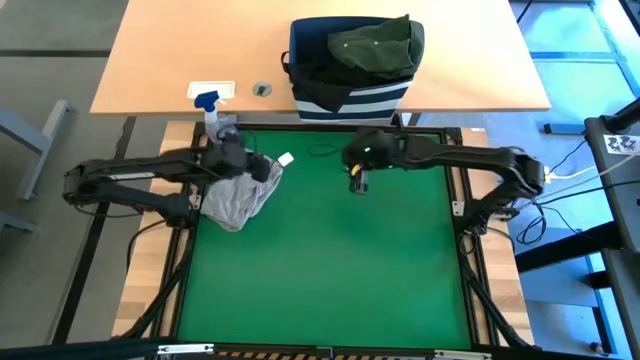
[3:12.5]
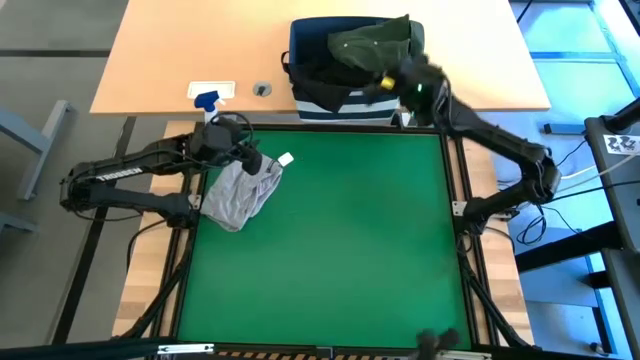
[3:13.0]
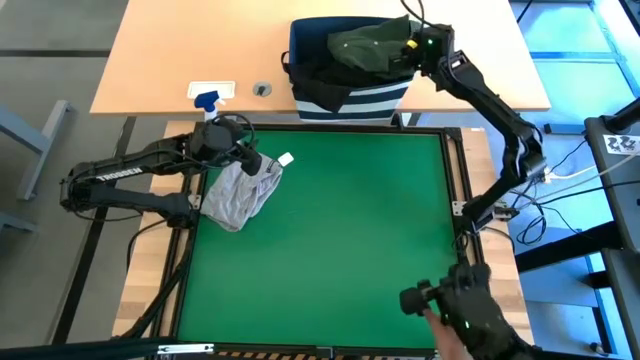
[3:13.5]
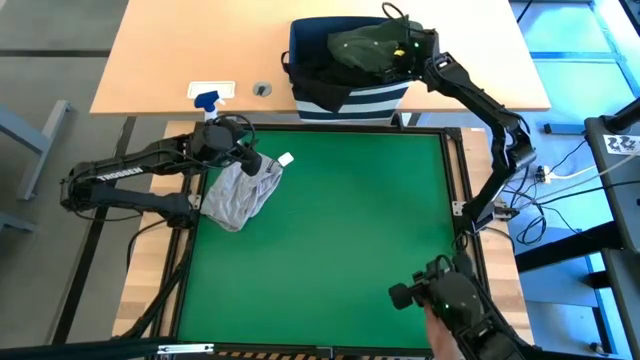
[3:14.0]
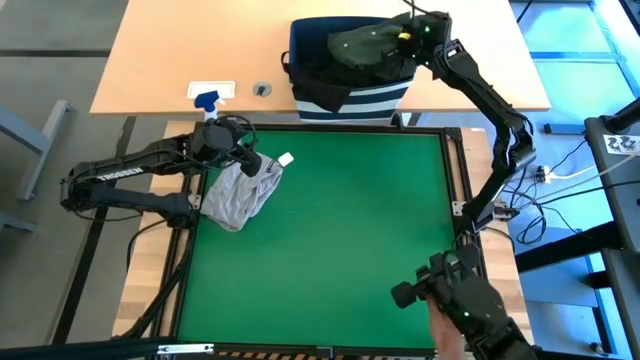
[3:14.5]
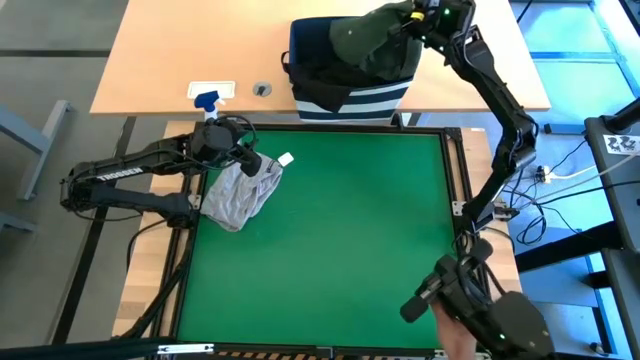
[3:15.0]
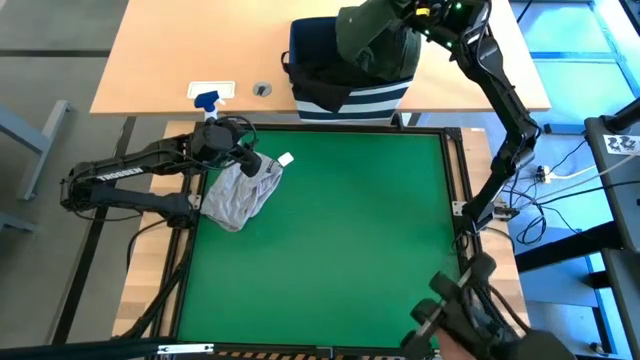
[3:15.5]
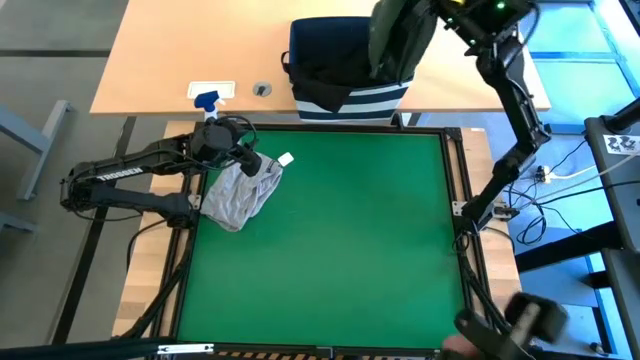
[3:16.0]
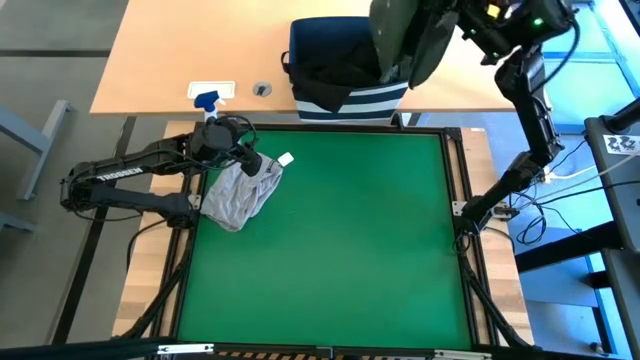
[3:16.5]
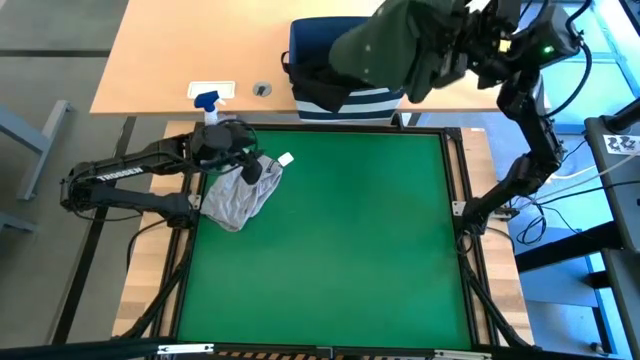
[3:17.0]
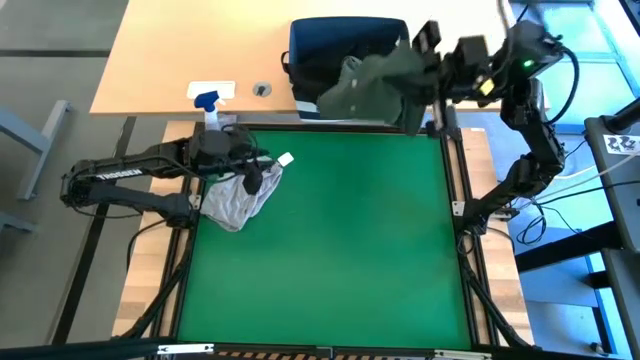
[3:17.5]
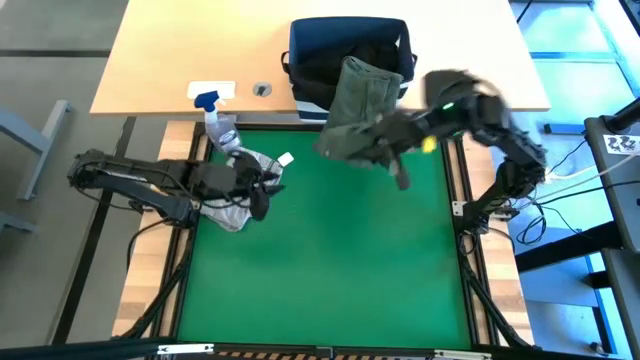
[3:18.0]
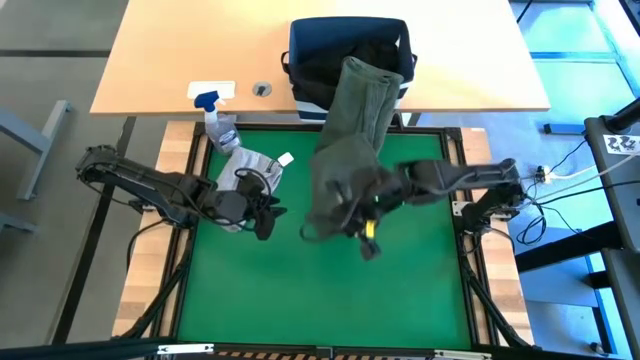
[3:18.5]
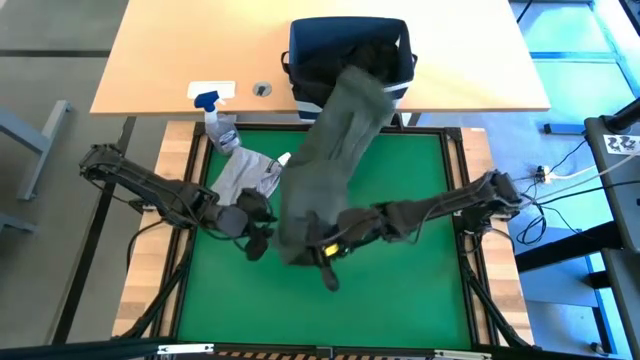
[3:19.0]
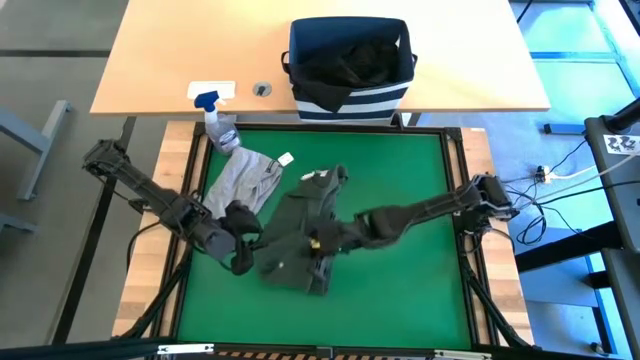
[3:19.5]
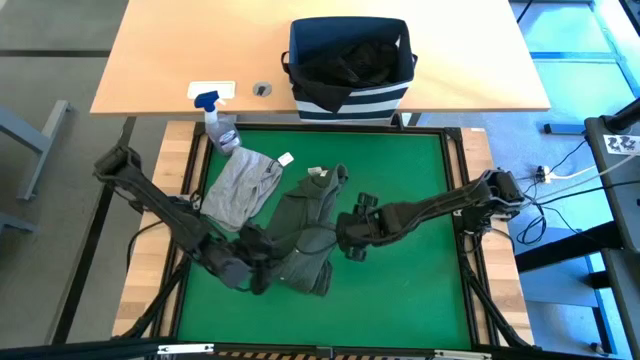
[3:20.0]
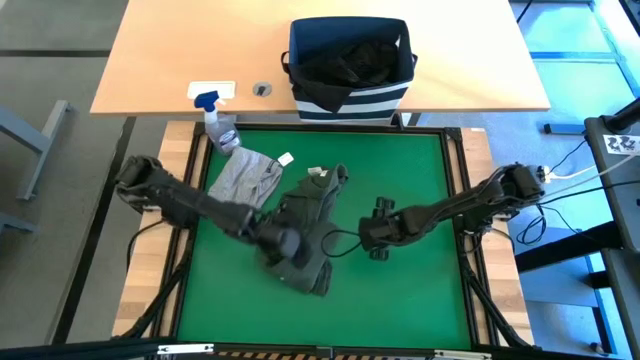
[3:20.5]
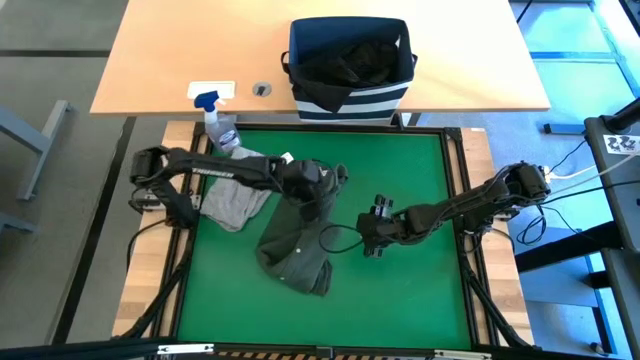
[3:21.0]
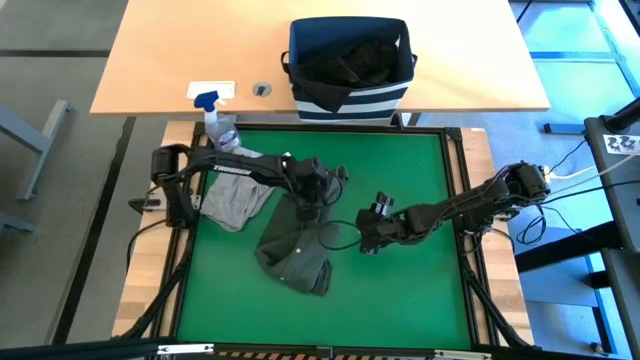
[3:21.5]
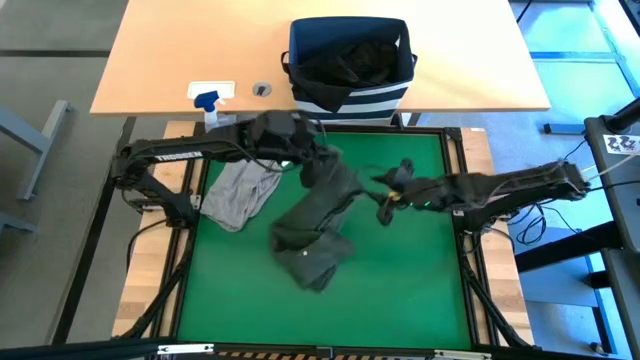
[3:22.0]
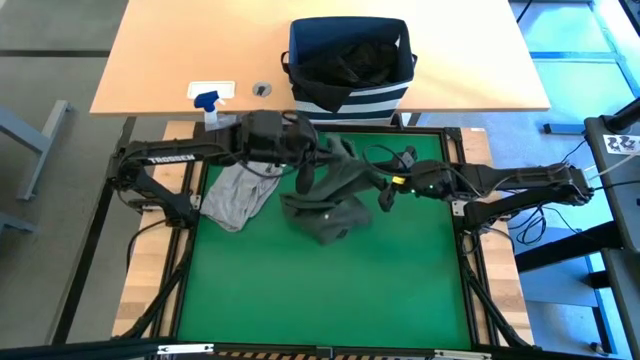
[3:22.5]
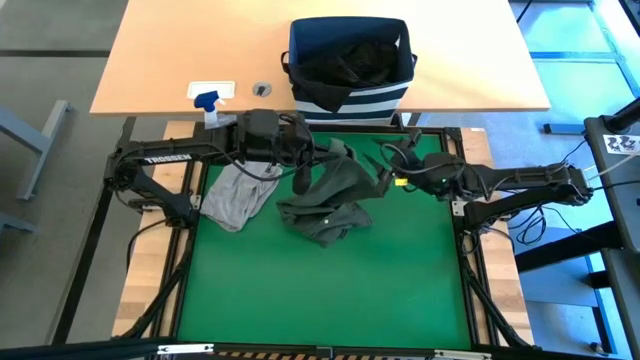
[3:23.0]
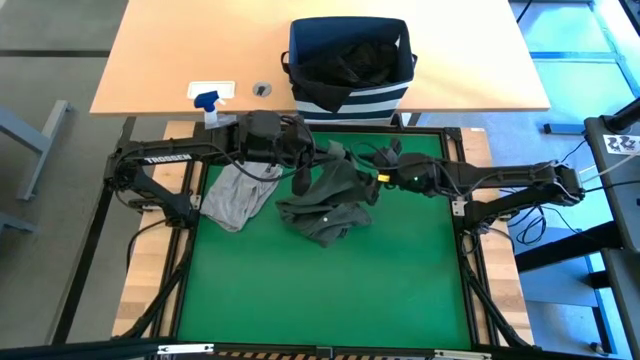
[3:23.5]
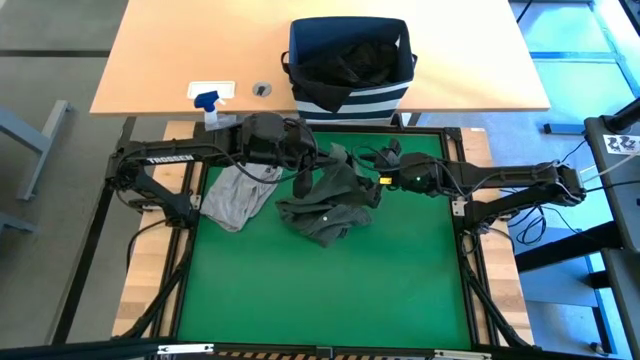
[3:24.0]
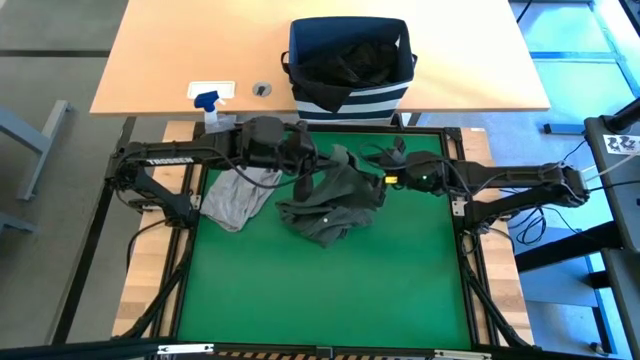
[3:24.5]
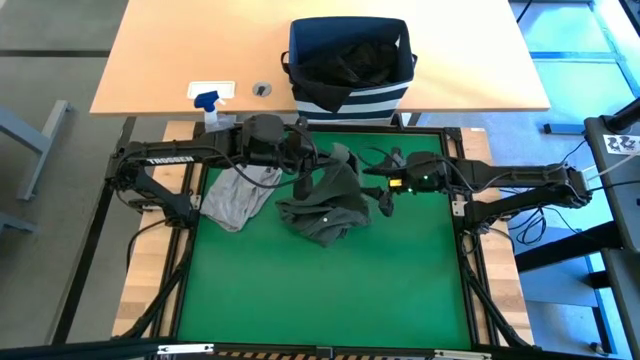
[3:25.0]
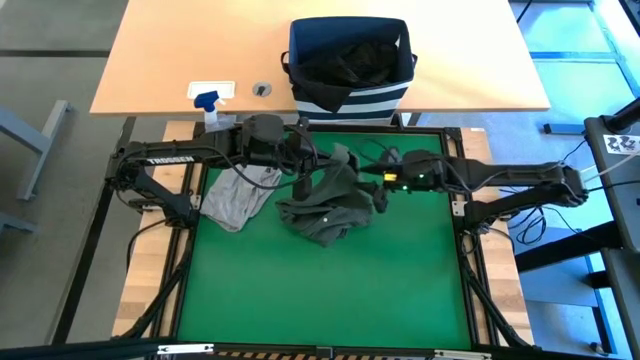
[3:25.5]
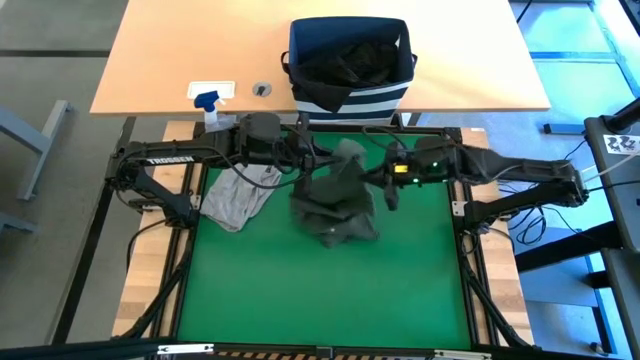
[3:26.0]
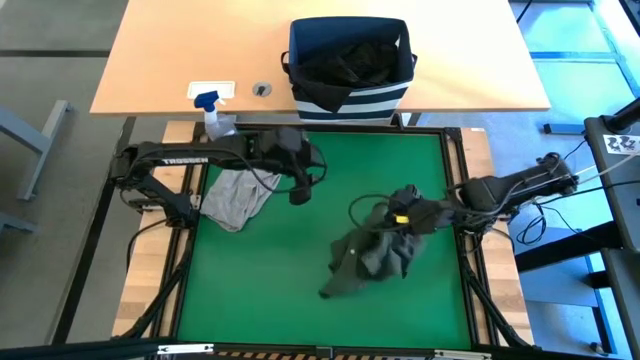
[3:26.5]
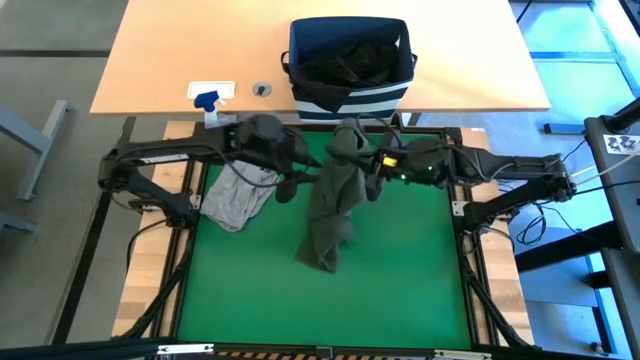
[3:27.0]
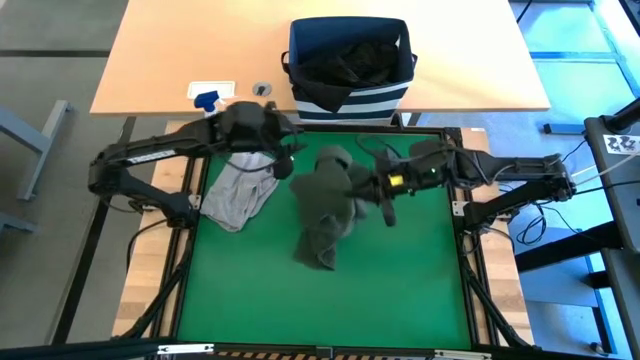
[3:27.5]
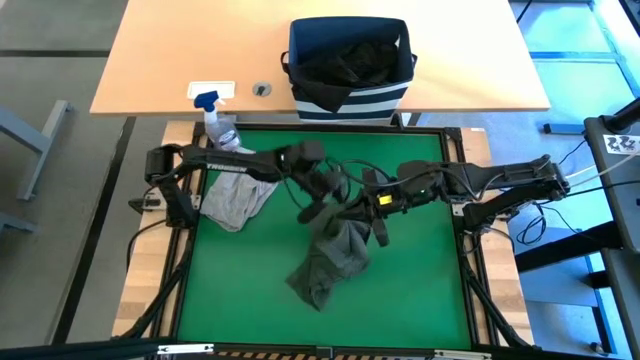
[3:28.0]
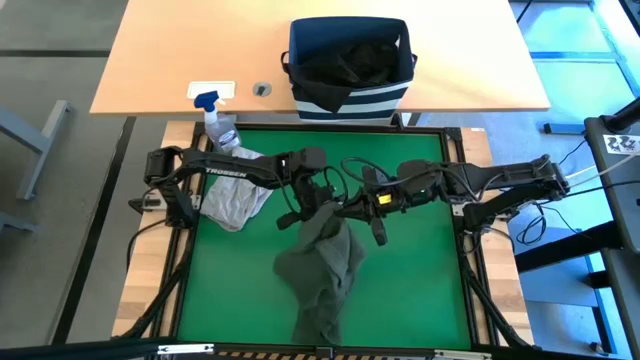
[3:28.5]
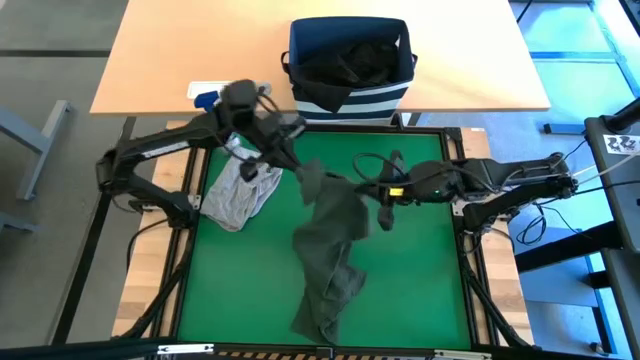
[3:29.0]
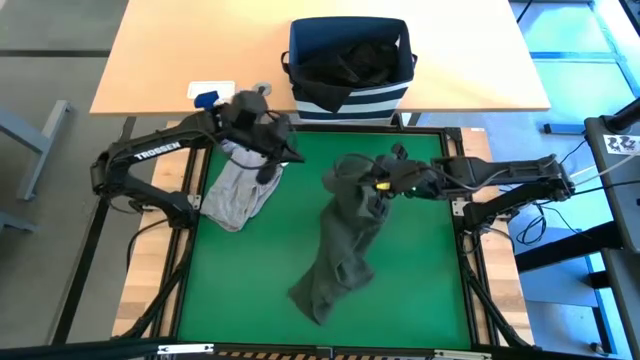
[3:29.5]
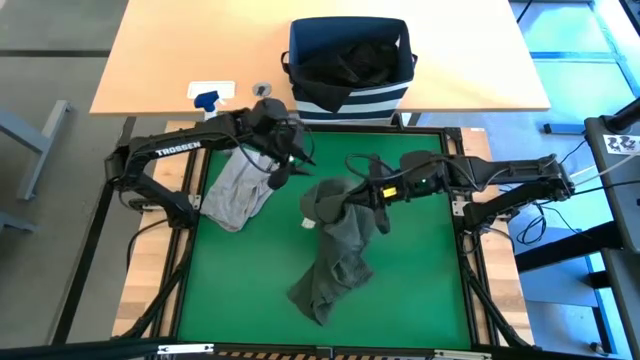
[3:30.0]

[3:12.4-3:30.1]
Task: Fold Laundry from Bin
Fold the green shirt

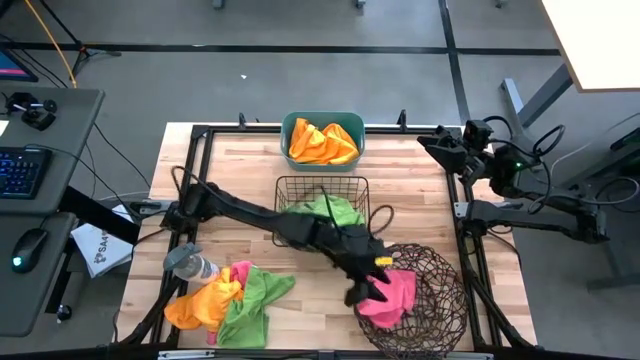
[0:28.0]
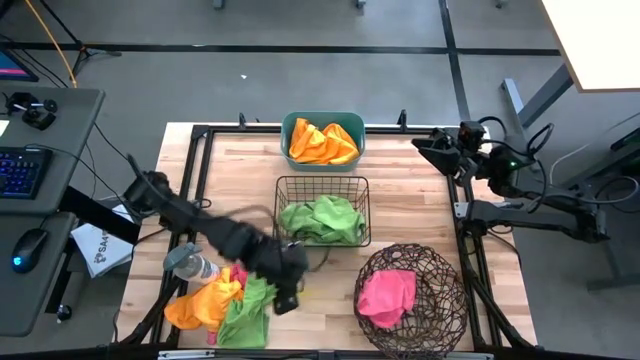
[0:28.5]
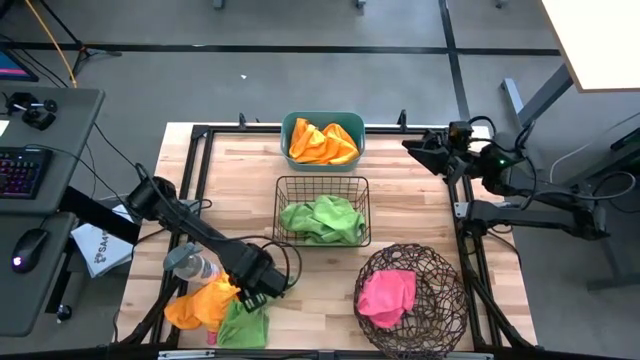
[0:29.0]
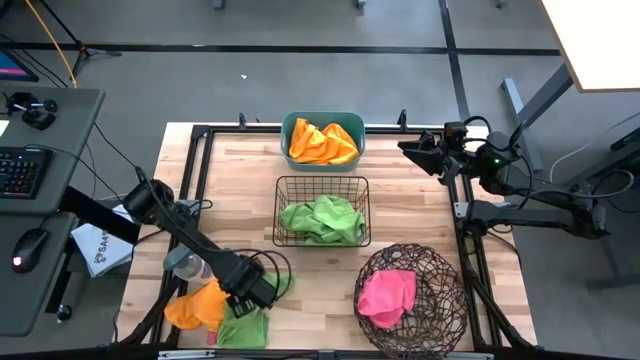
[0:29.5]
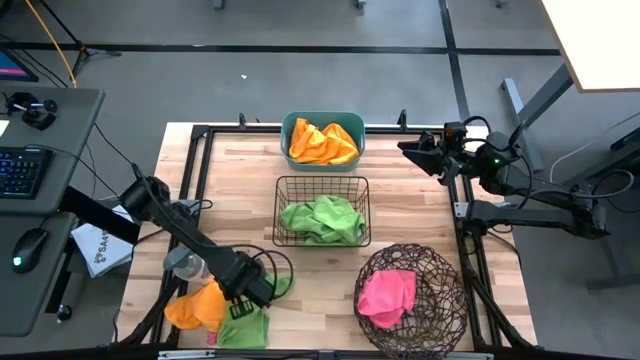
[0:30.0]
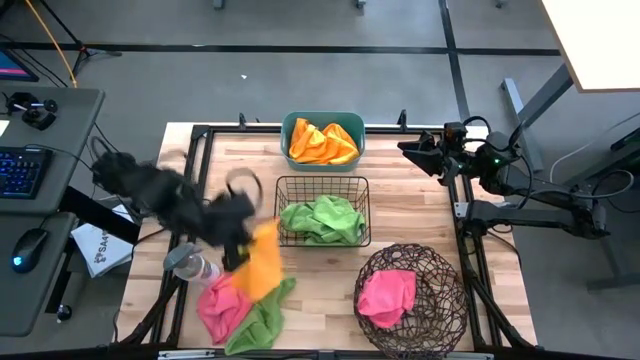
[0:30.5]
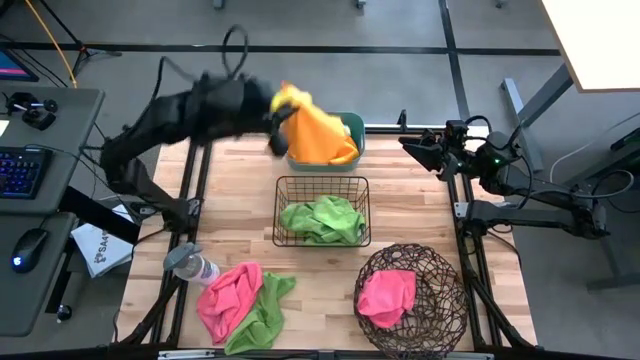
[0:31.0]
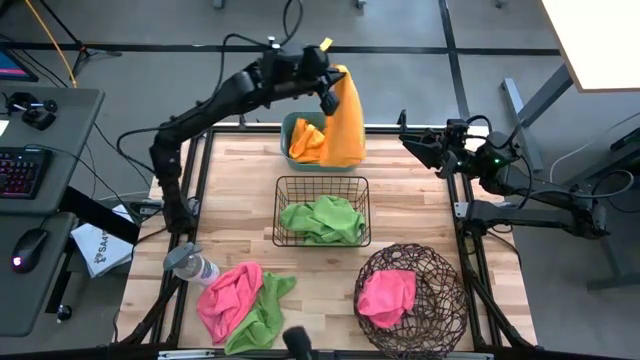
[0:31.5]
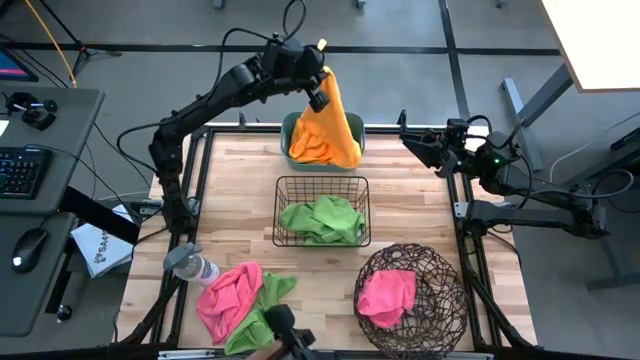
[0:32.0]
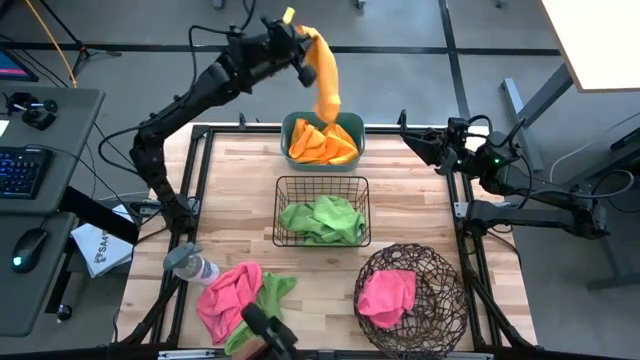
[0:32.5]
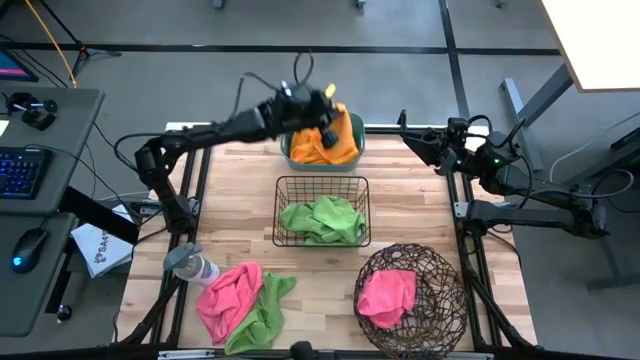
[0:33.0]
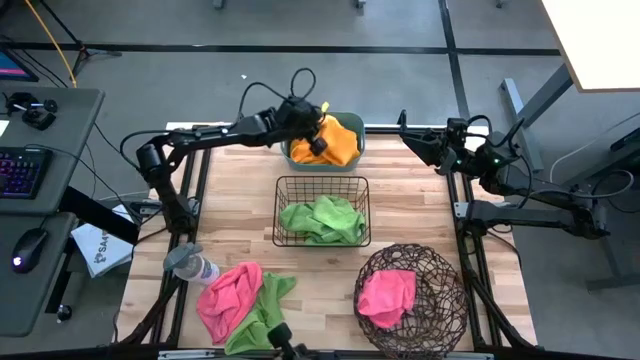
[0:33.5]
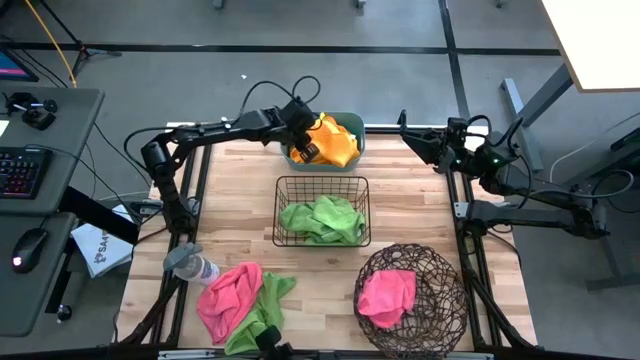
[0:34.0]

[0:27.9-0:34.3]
Task: Sort microfiber towel by color & place in baskets
Put the orange microfiber cloth into the blue and green bin
